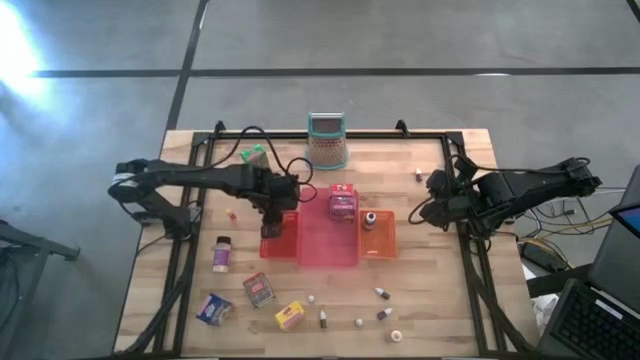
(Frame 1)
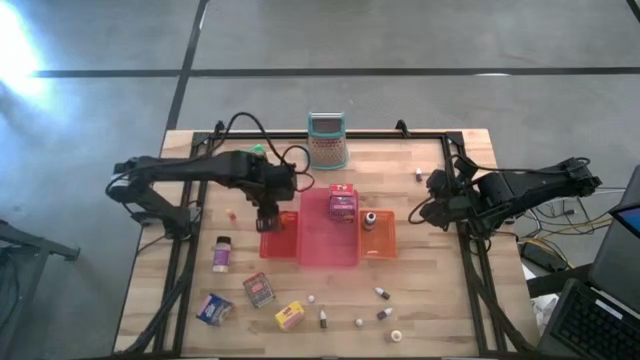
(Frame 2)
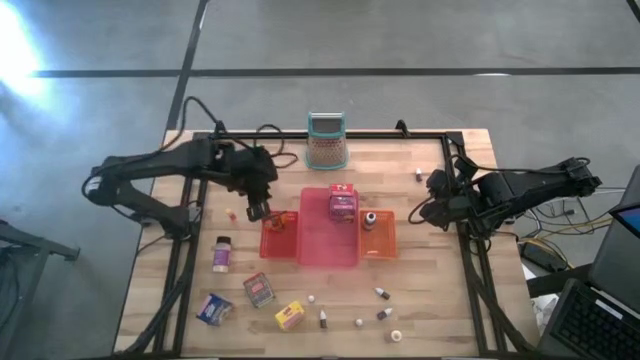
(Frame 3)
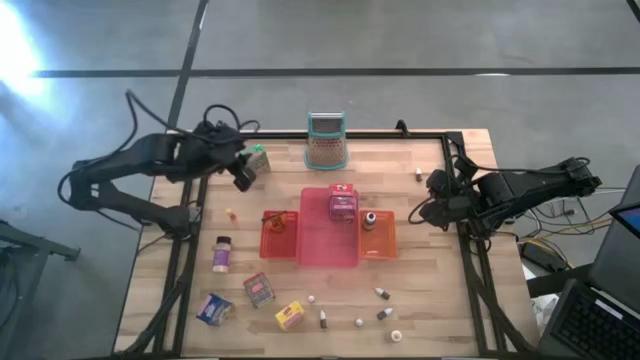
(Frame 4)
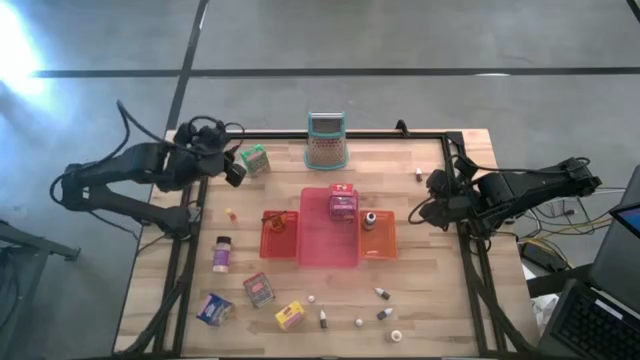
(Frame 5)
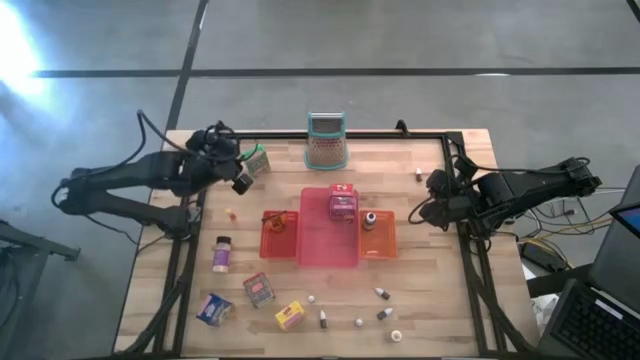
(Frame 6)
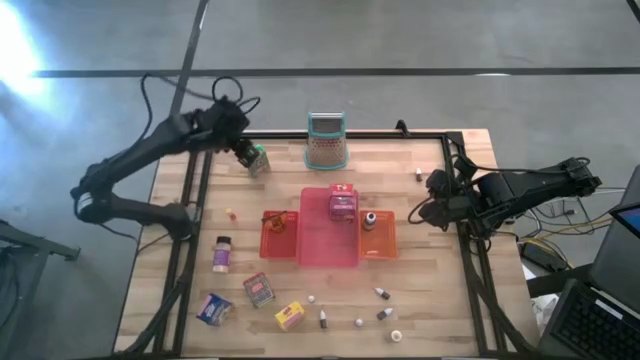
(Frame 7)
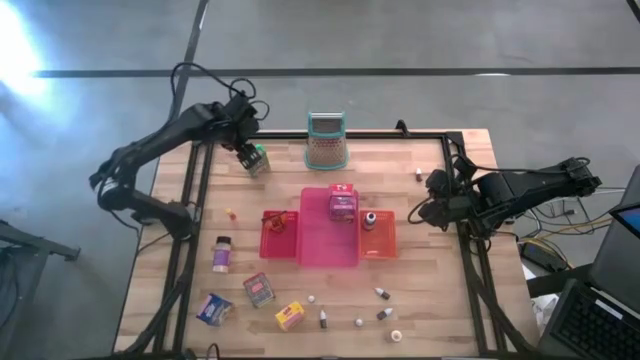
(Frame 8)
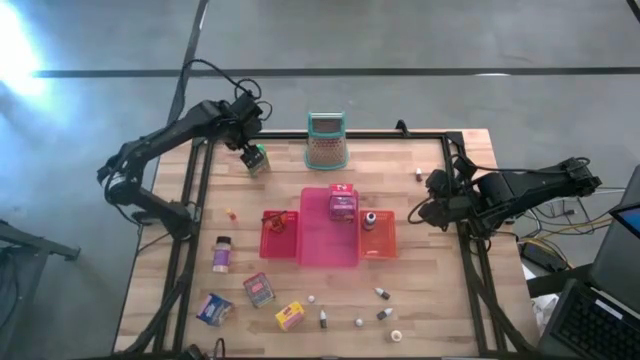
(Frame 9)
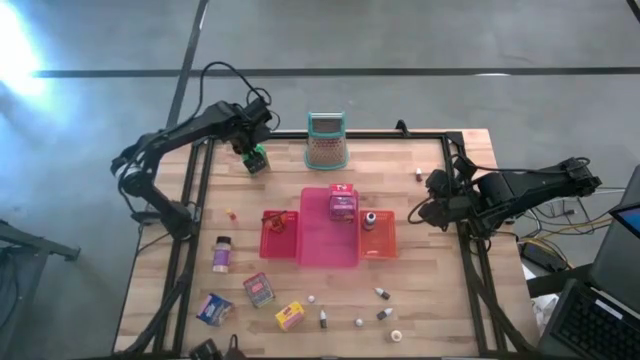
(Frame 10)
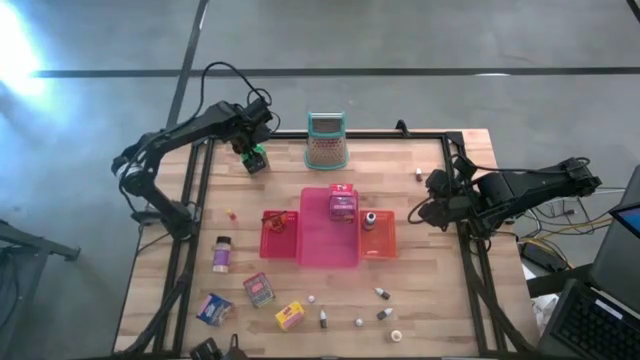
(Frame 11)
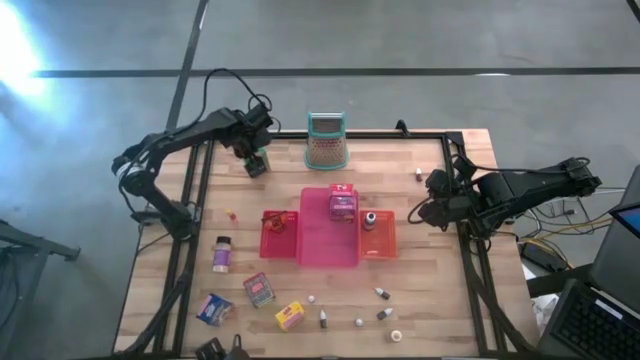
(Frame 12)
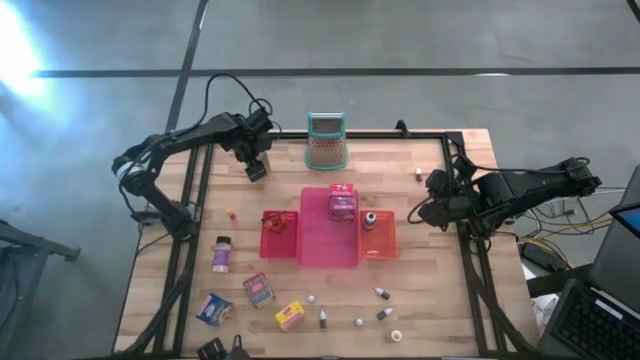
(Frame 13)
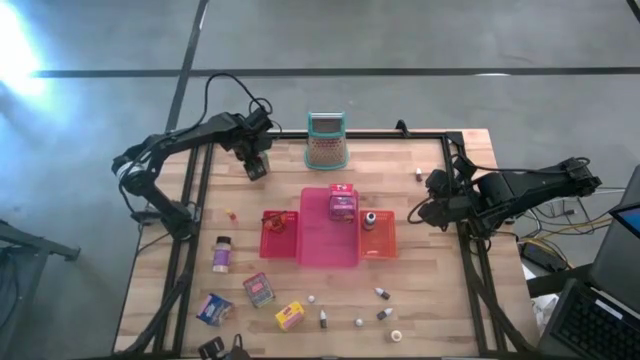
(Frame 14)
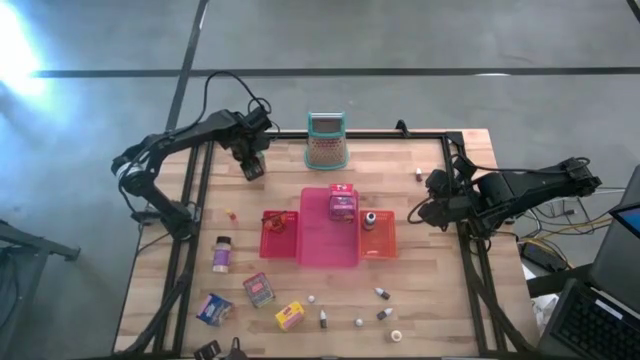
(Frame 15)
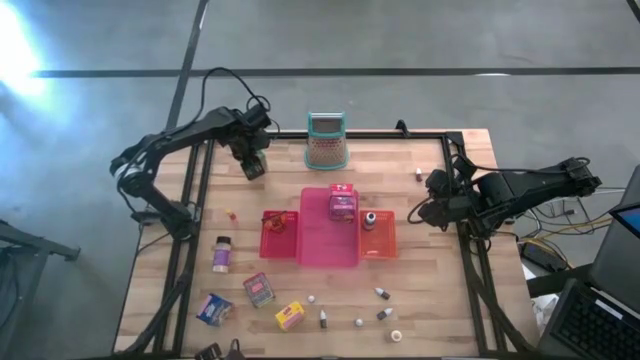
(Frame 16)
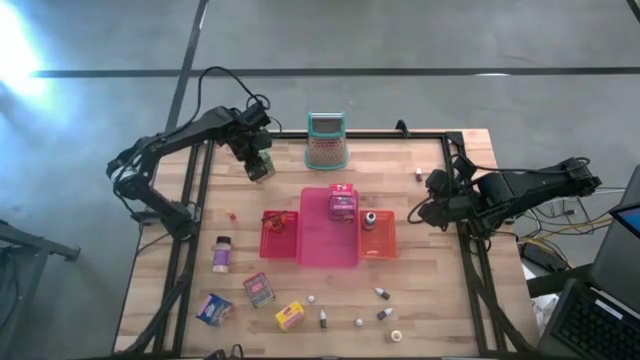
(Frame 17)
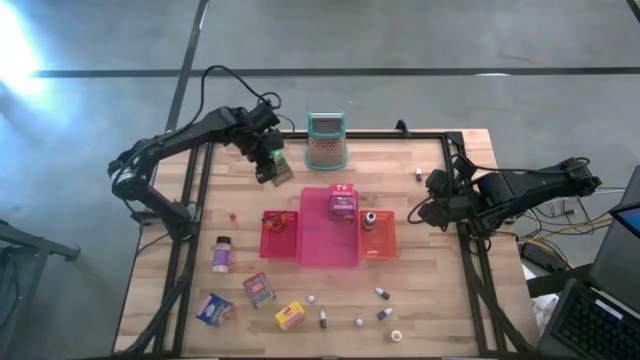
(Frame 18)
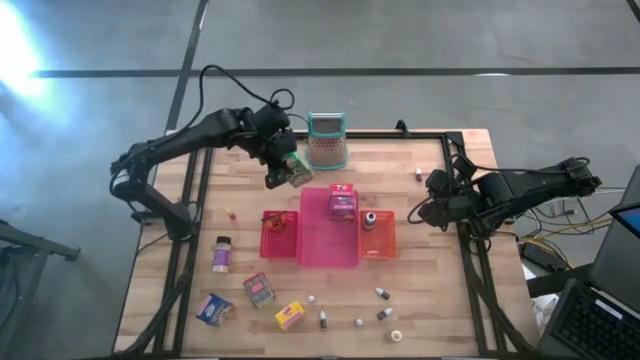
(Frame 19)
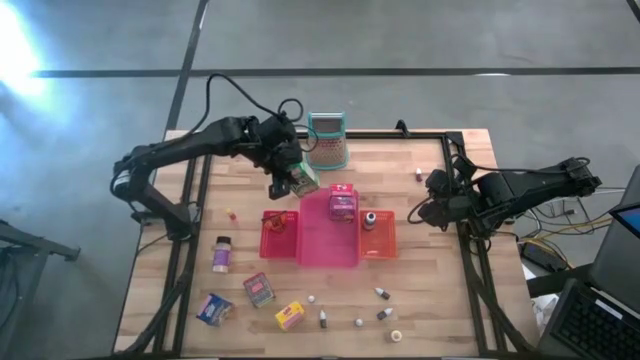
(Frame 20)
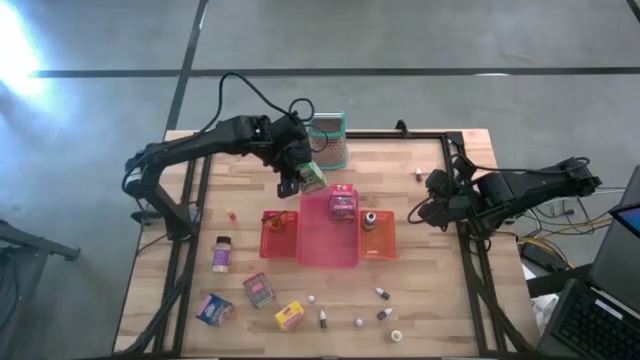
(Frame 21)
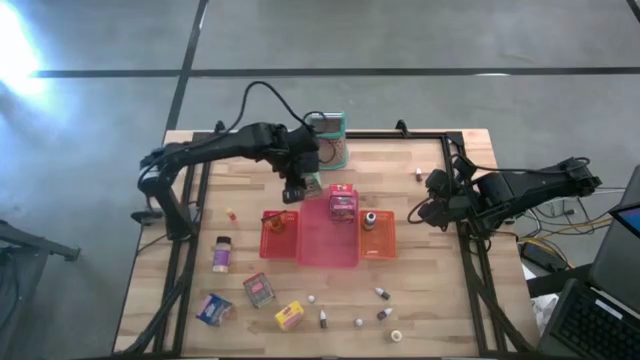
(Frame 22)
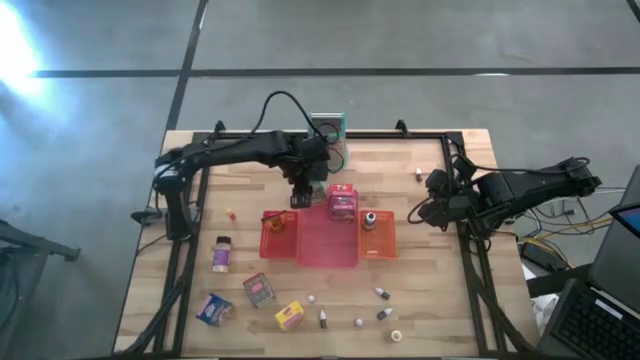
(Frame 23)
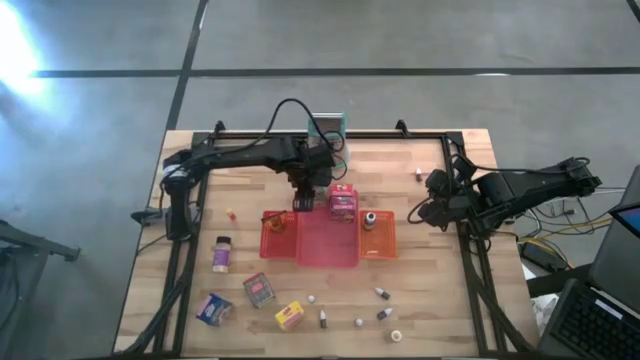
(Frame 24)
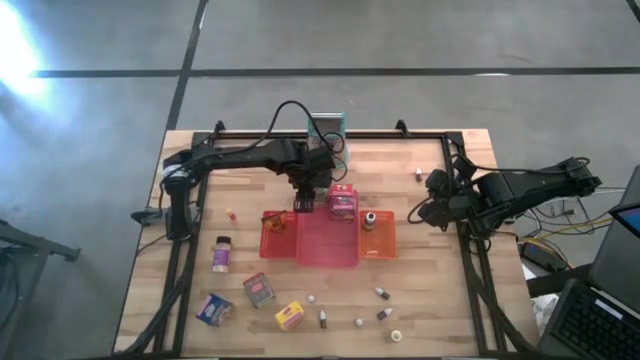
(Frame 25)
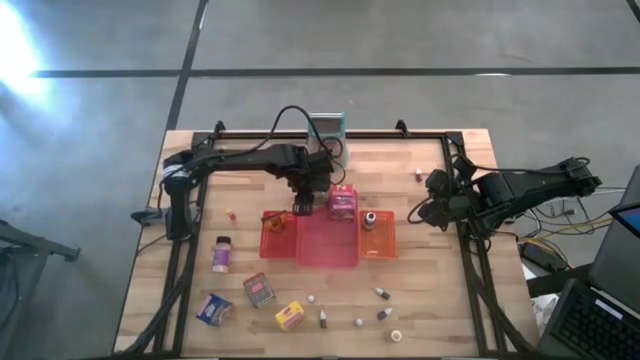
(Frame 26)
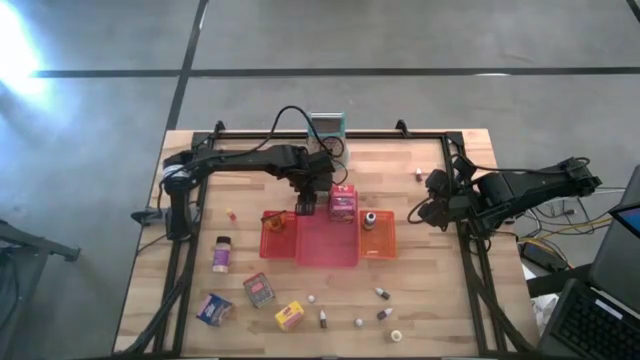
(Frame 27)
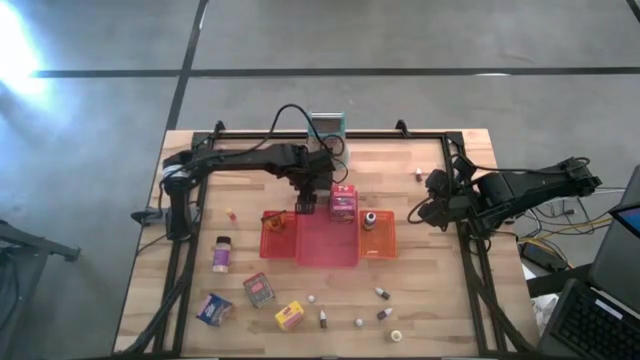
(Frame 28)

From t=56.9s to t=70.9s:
Task: Pick & Place Kitchen Items
Put the green cereal box into the pink bin

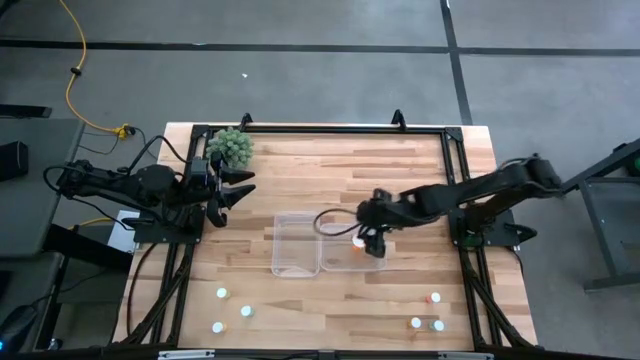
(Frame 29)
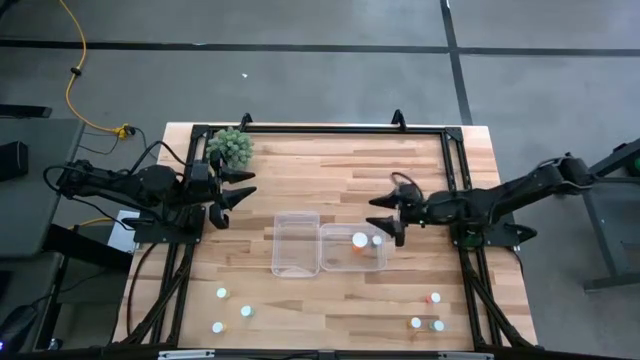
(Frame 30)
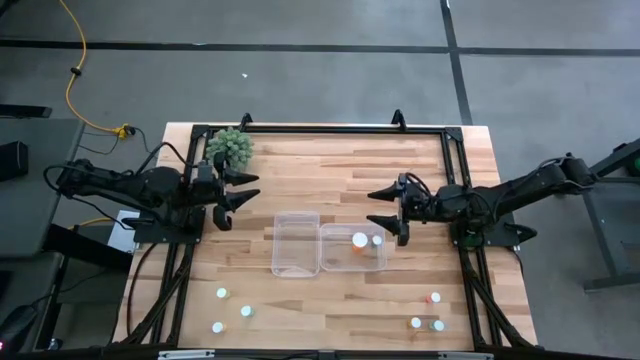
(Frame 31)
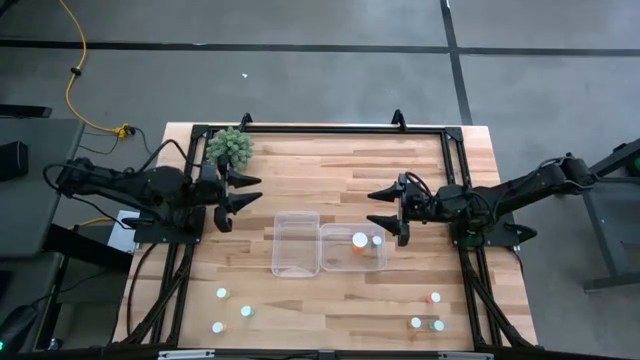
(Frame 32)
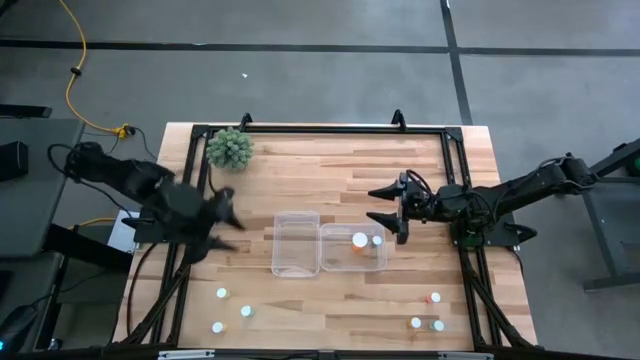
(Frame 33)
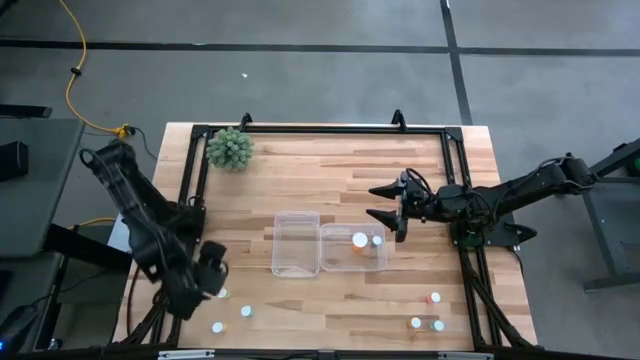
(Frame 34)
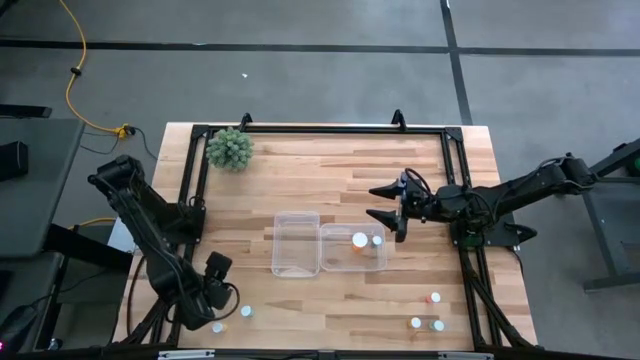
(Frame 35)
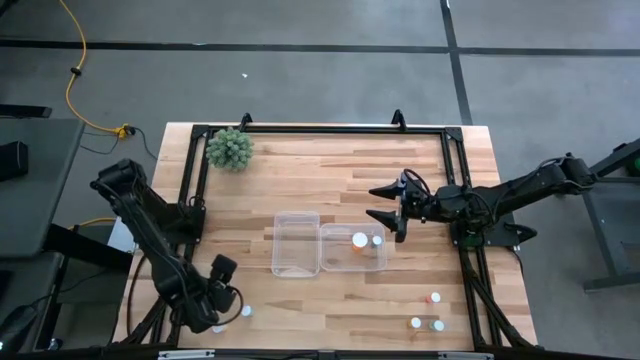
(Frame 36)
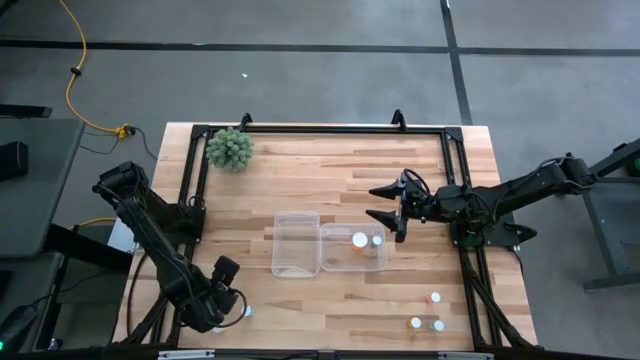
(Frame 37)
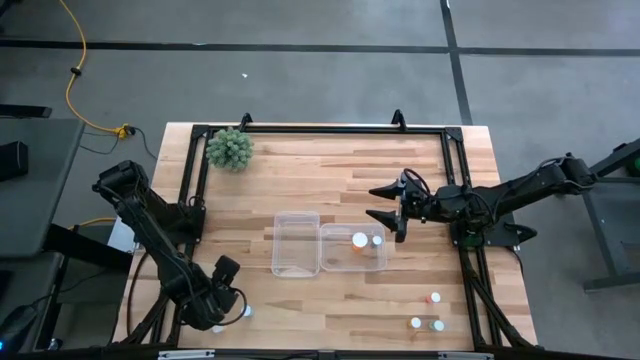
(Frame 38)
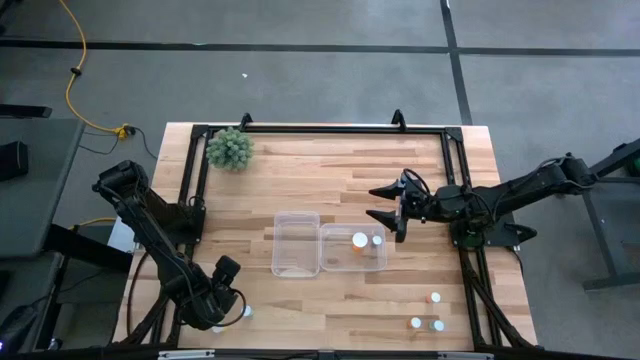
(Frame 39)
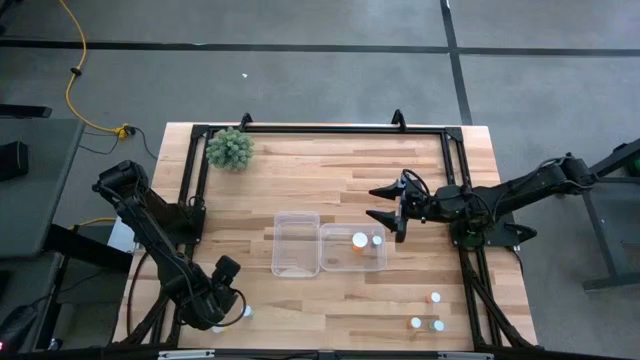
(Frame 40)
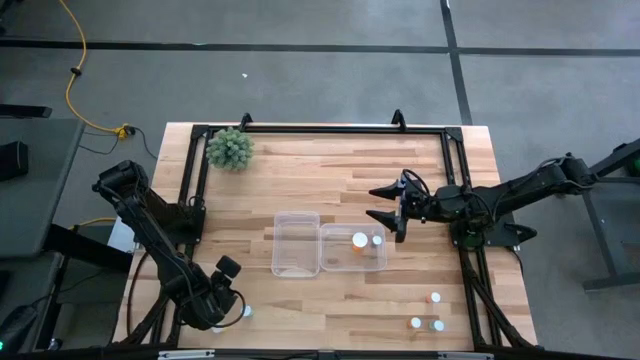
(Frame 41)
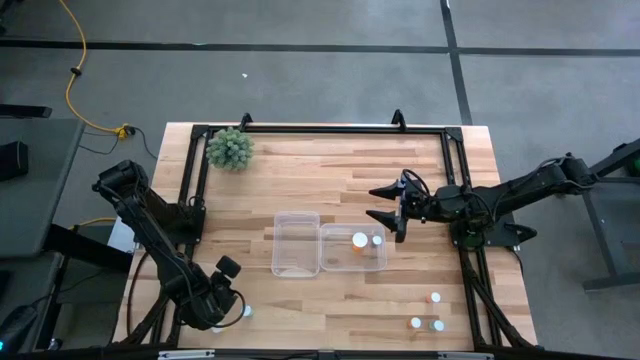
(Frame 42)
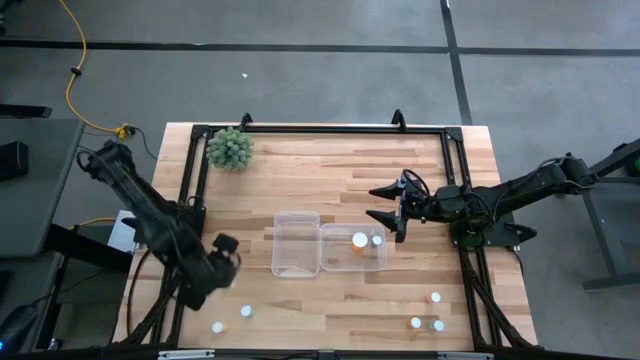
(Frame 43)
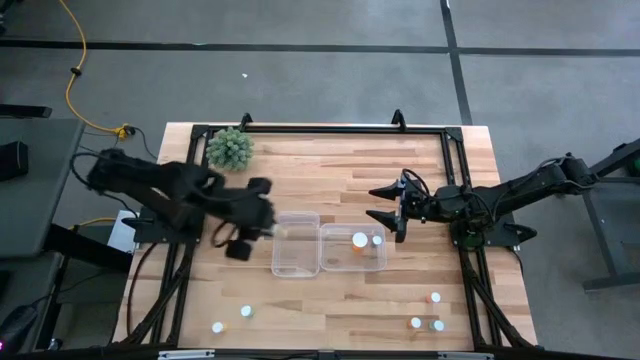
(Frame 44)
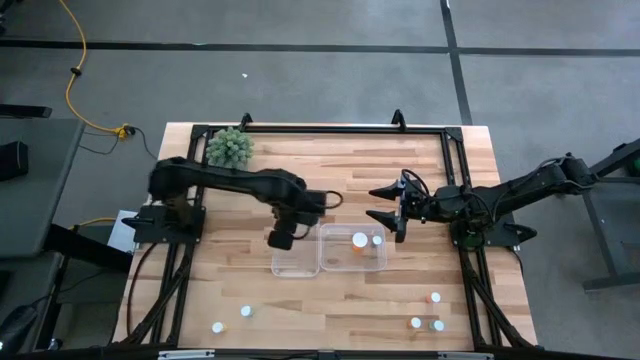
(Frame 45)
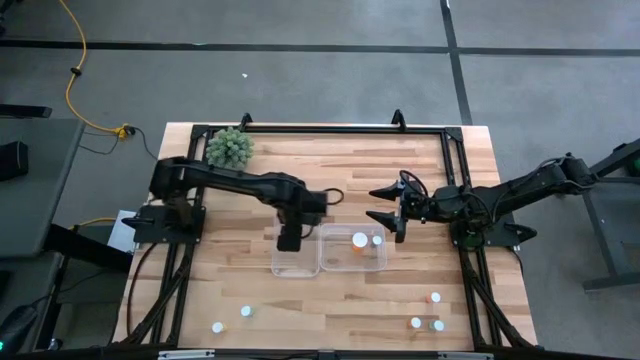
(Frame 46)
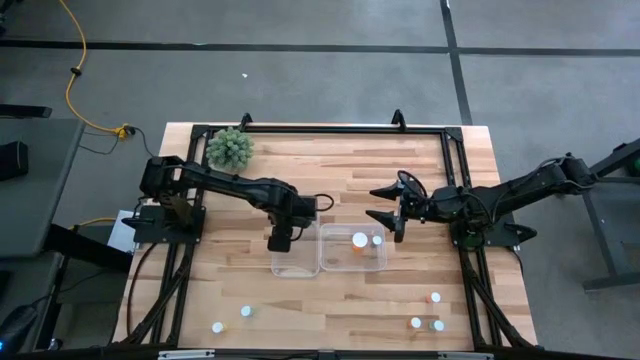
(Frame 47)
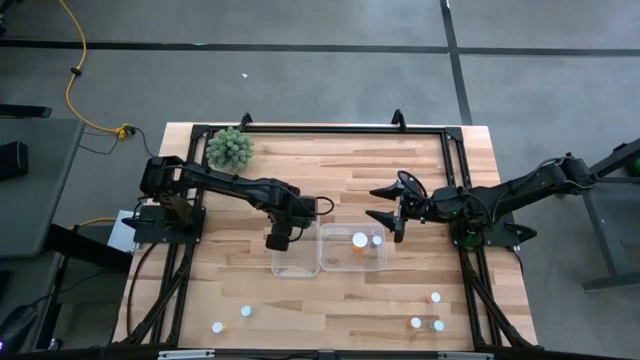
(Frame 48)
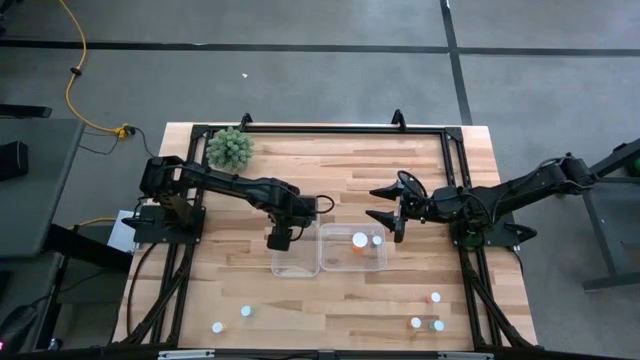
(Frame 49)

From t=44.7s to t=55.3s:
Task: Pick and place medicine bottles into bin by pill shape (circle, oval)
Put the top yellow pill bottle into the left transparent bin
